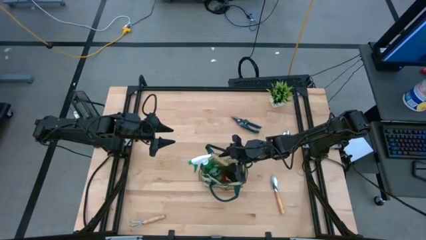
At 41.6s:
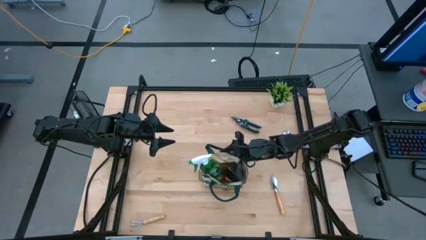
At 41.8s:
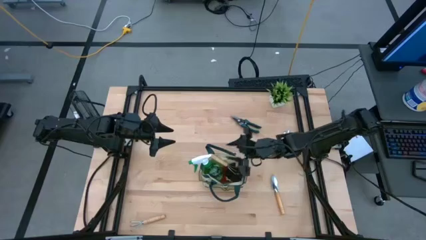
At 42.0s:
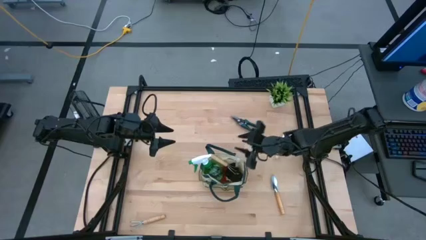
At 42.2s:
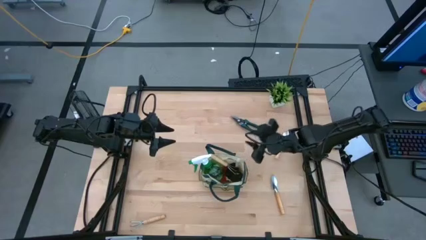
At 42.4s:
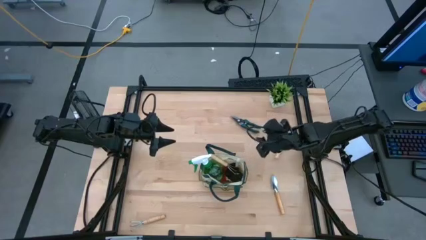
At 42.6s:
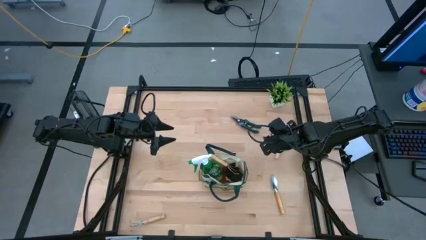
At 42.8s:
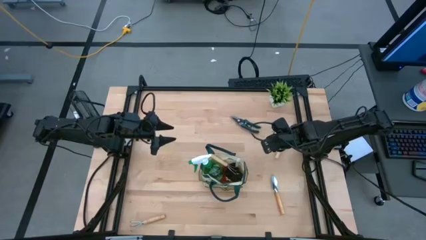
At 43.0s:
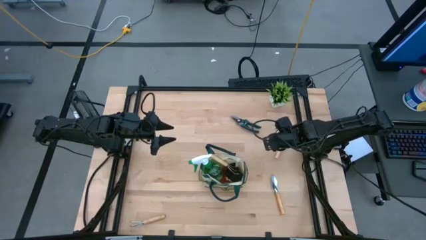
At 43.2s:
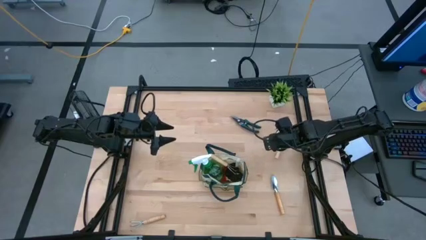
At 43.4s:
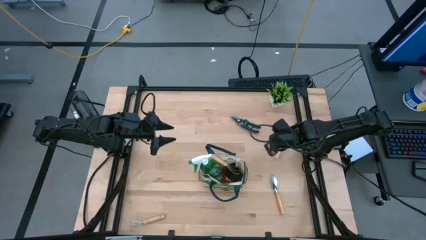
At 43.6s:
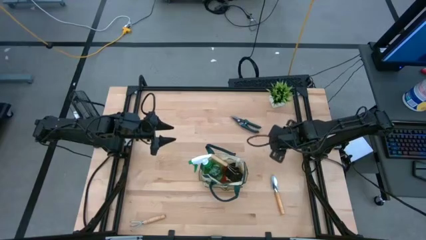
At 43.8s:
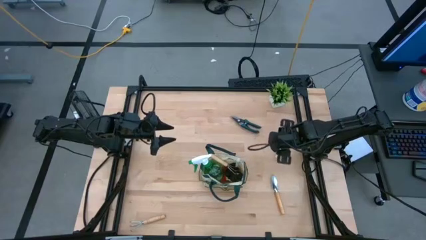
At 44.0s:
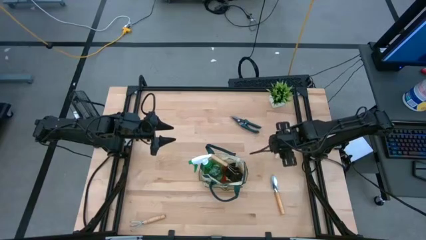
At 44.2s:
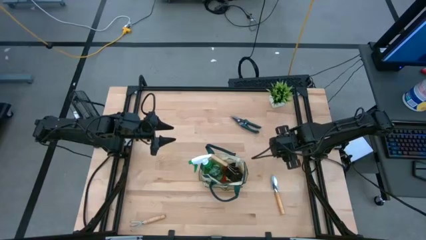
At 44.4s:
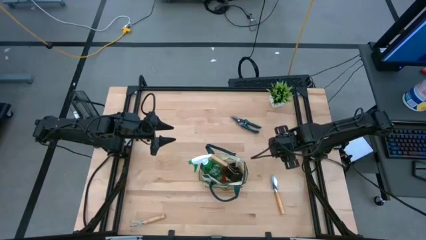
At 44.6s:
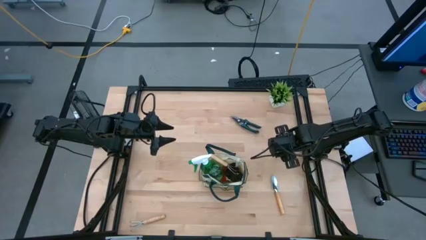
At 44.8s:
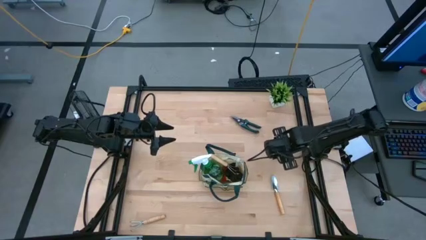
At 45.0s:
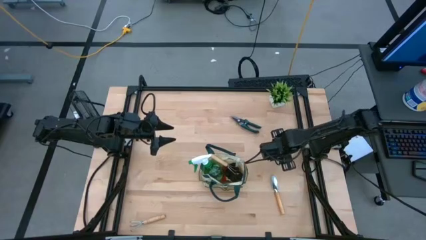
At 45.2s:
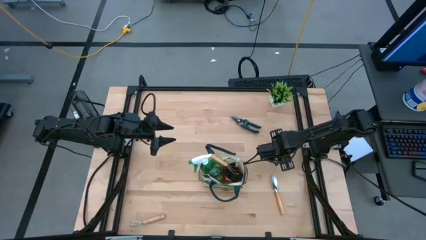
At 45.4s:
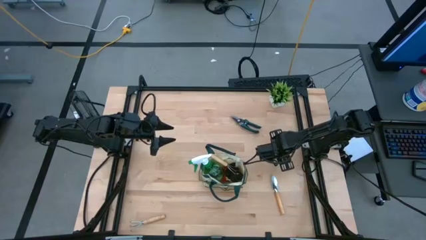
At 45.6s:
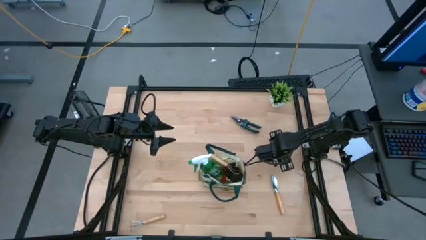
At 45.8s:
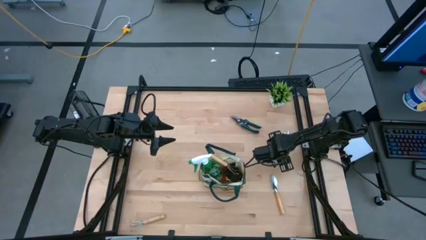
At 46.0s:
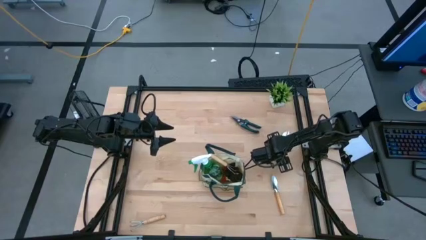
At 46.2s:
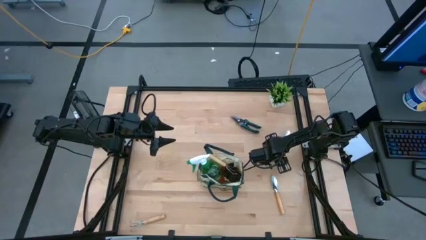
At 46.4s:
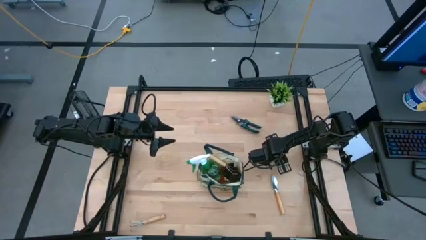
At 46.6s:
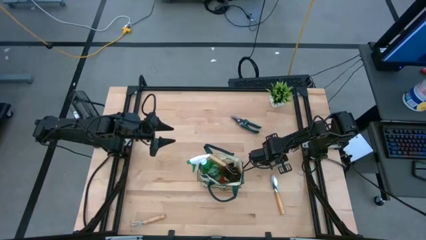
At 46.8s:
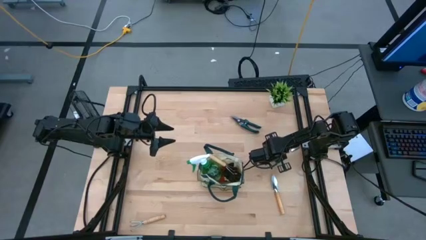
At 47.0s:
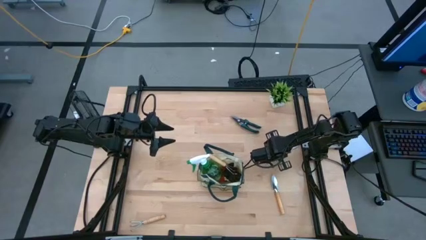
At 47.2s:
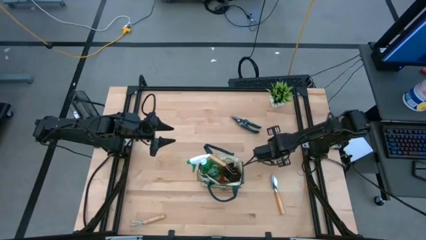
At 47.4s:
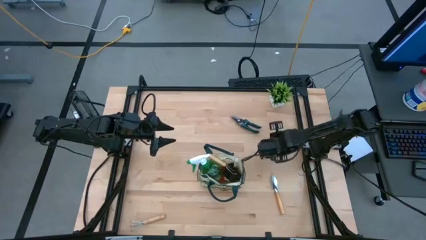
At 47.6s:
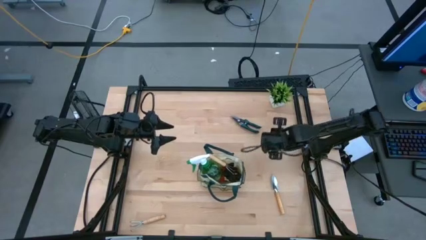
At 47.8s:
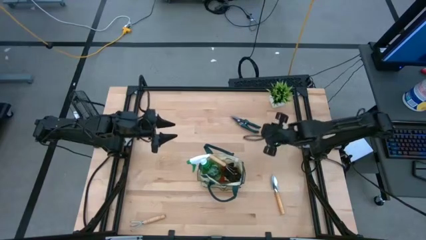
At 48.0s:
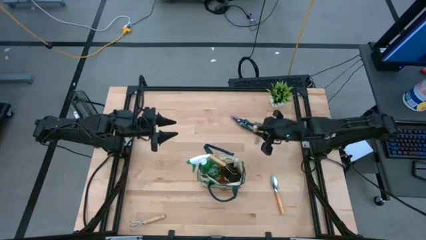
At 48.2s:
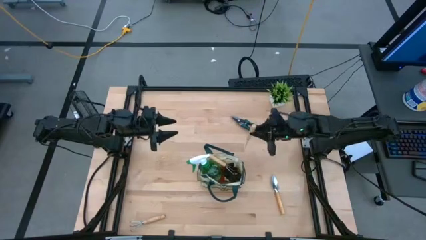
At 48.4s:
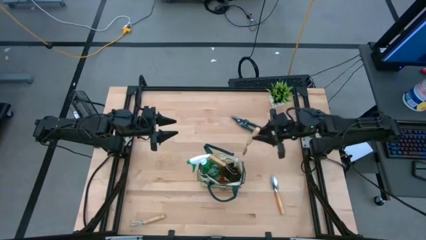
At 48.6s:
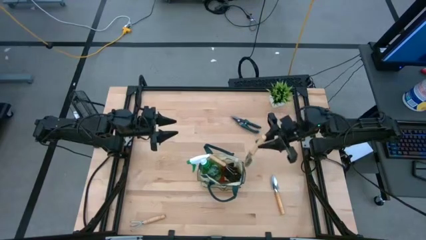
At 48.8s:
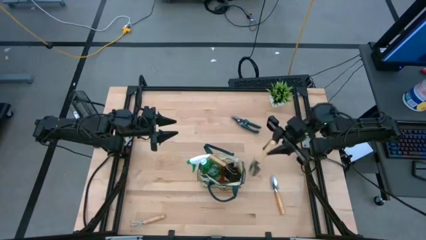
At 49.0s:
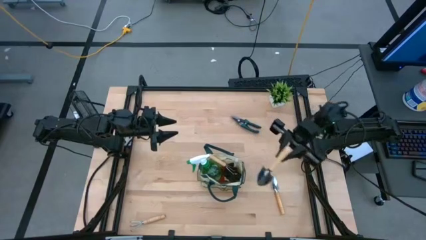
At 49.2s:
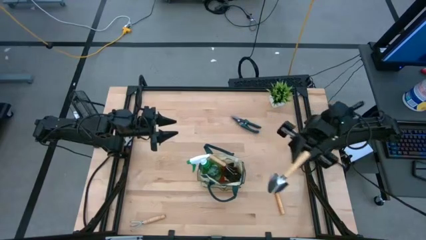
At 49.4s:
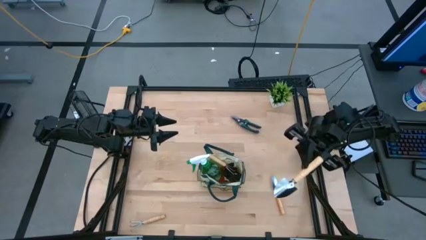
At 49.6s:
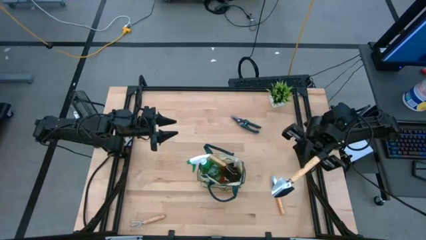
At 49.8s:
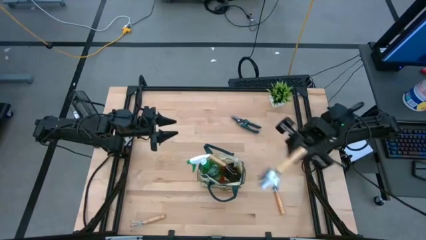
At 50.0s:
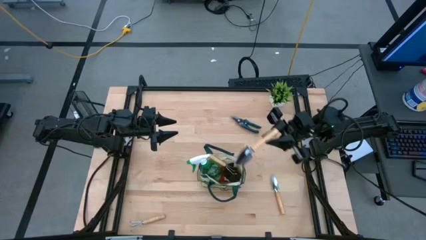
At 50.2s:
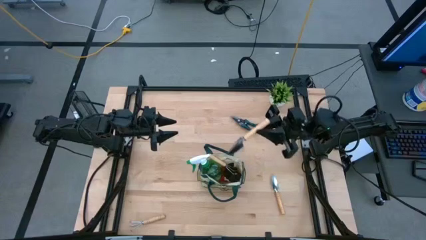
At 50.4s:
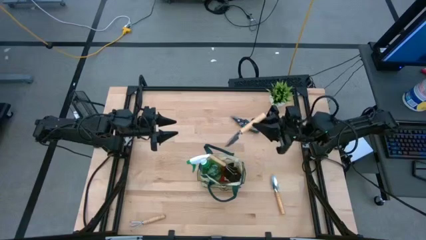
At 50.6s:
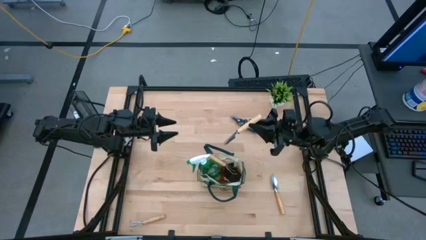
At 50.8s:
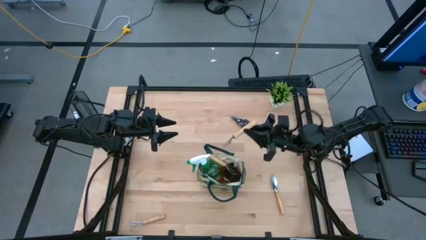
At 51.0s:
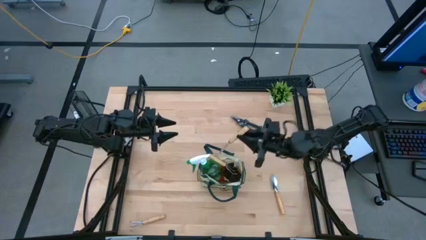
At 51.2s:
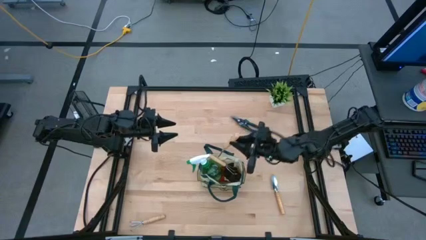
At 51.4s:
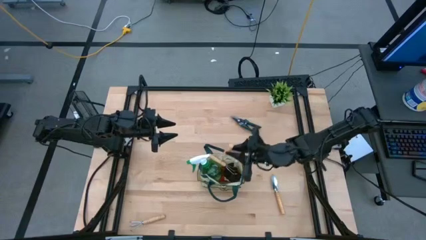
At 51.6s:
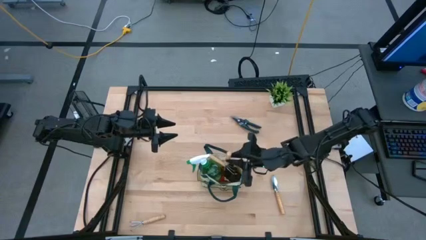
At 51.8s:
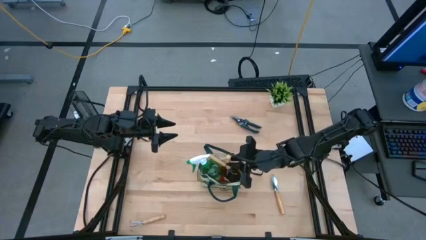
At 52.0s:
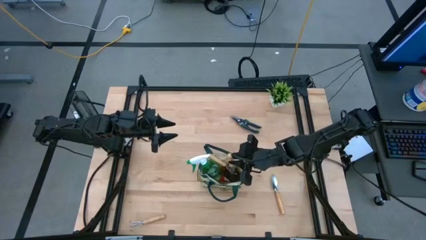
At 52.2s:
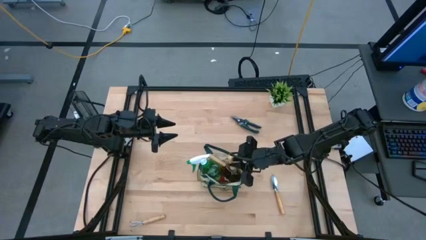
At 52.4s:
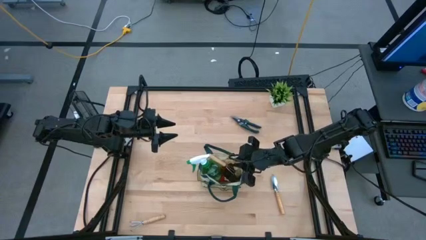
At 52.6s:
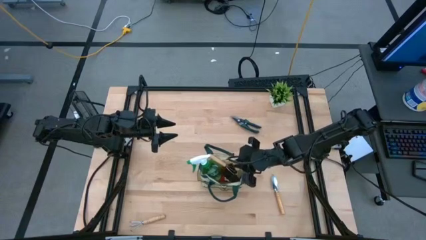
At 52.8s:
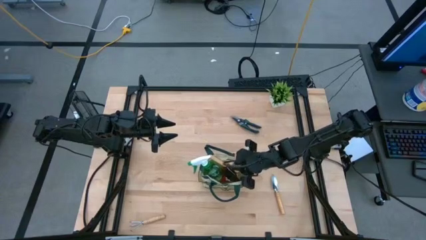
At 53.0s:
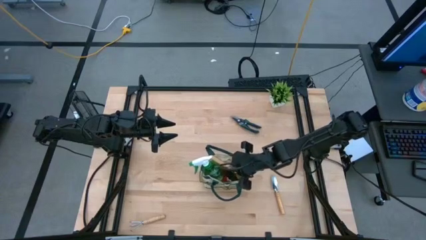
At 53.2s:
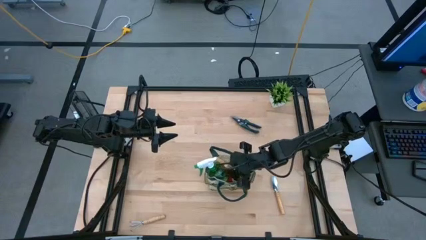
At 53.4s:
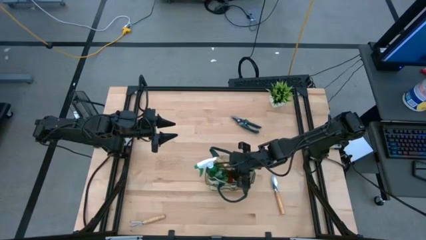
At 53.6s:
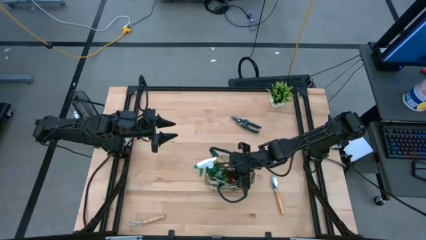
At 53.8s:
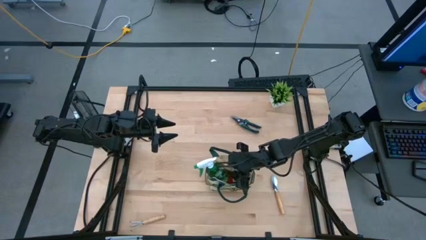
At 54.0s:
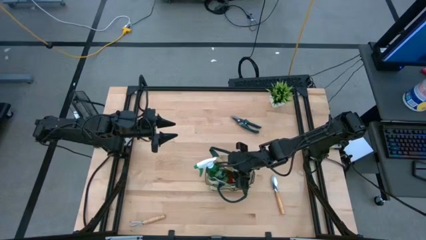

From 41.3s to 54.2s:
Task: Pick & Place Garden tools in Gardening bag
Put the top brown trowel into the gardening bag
